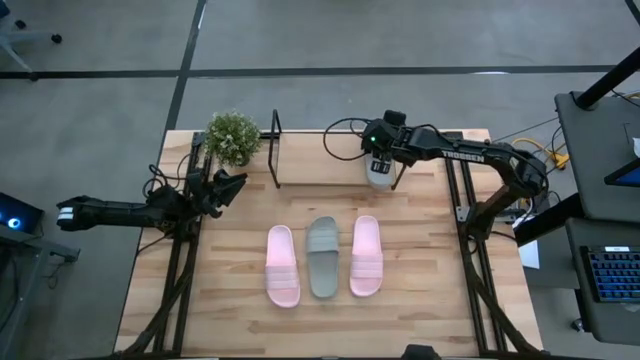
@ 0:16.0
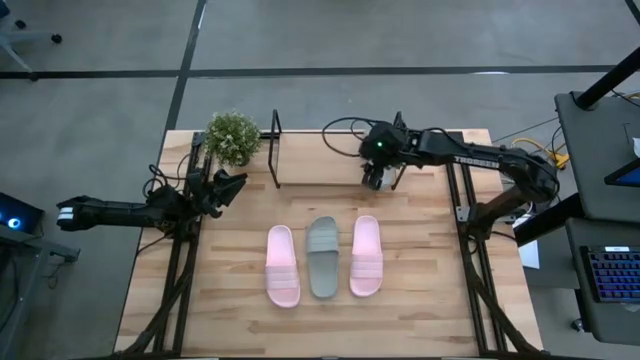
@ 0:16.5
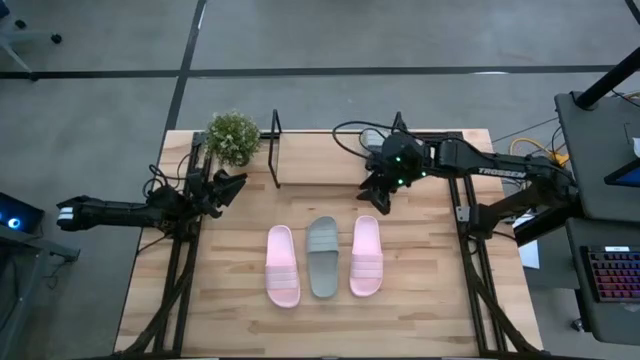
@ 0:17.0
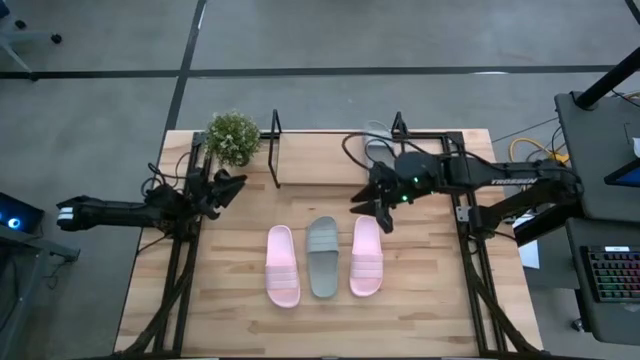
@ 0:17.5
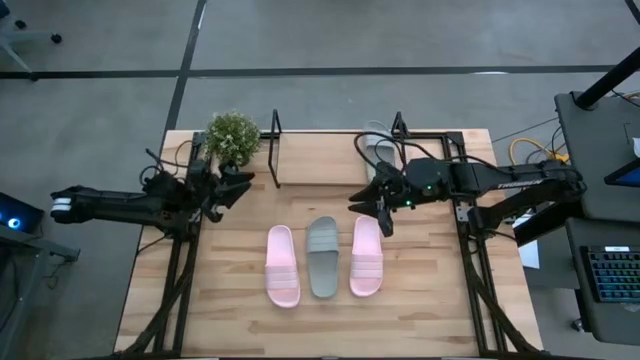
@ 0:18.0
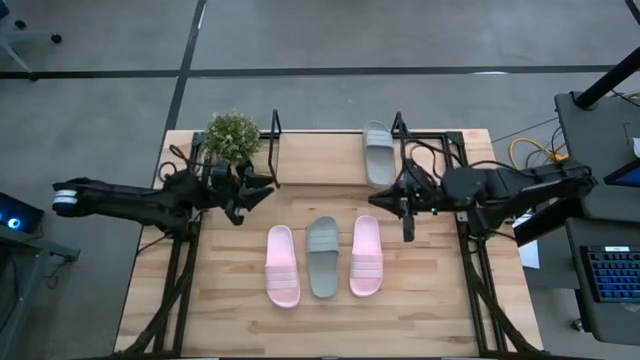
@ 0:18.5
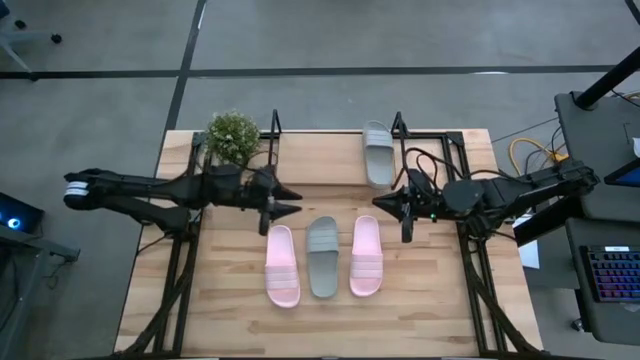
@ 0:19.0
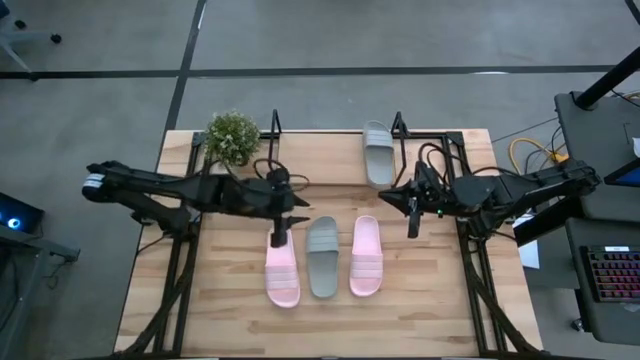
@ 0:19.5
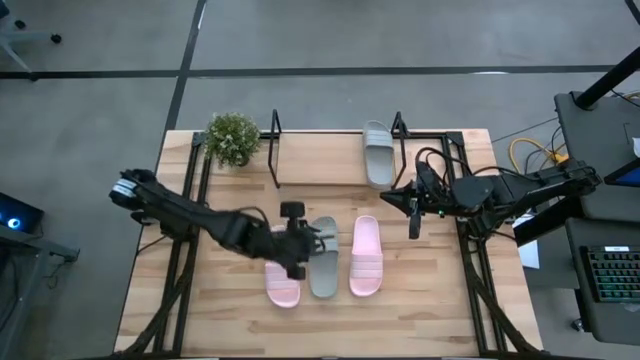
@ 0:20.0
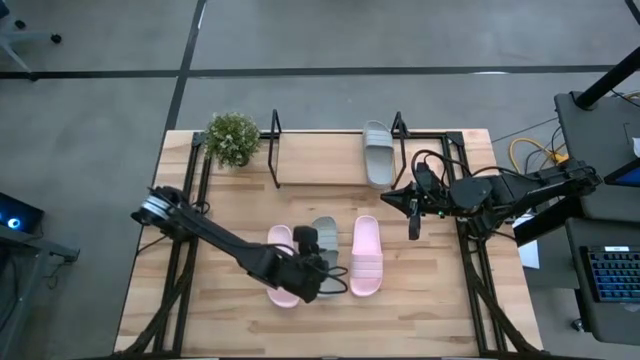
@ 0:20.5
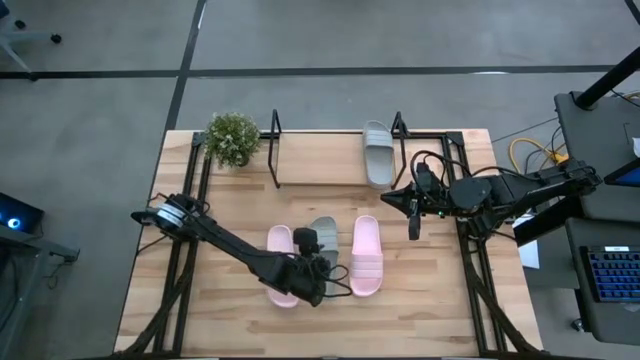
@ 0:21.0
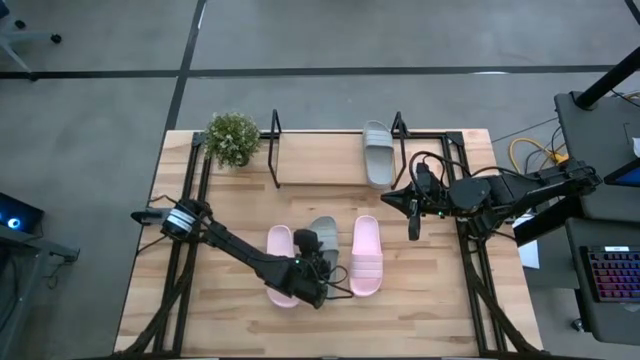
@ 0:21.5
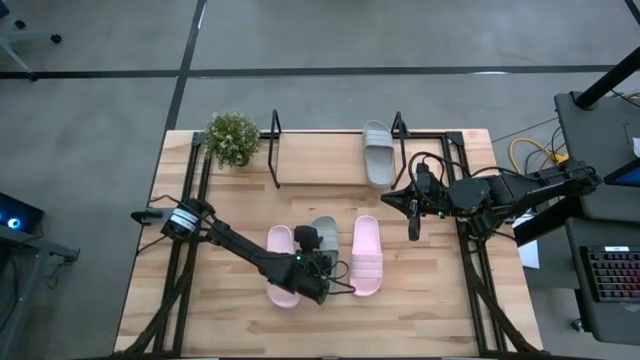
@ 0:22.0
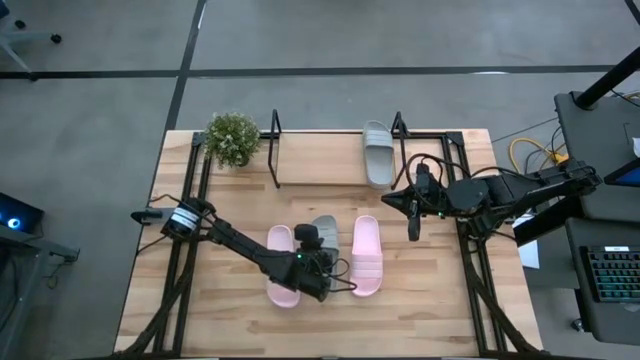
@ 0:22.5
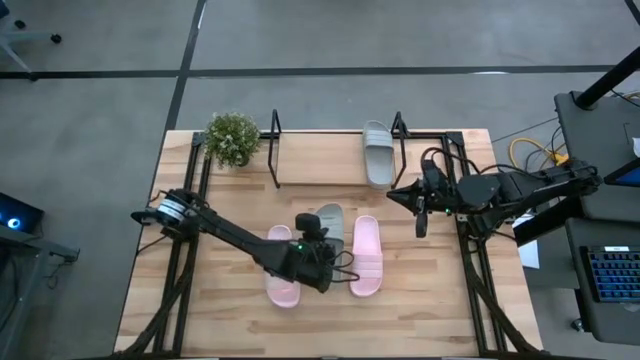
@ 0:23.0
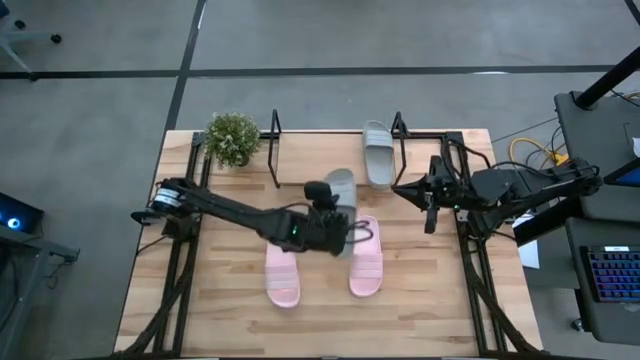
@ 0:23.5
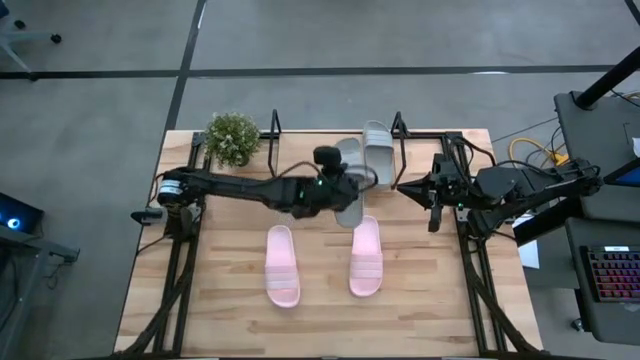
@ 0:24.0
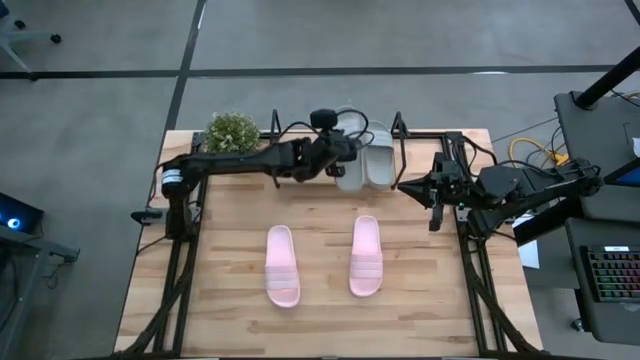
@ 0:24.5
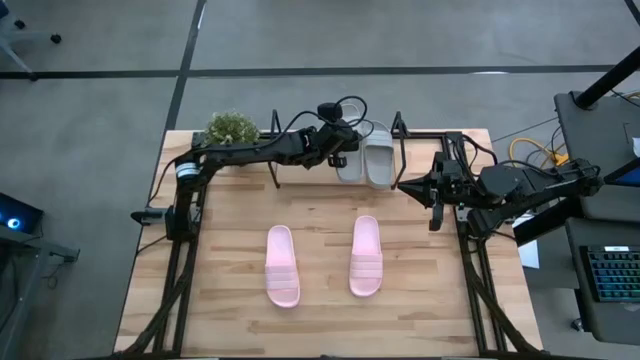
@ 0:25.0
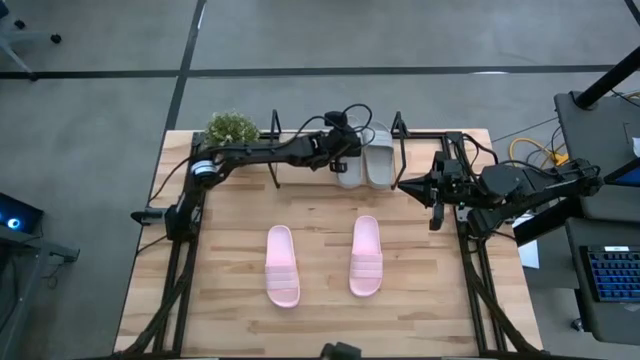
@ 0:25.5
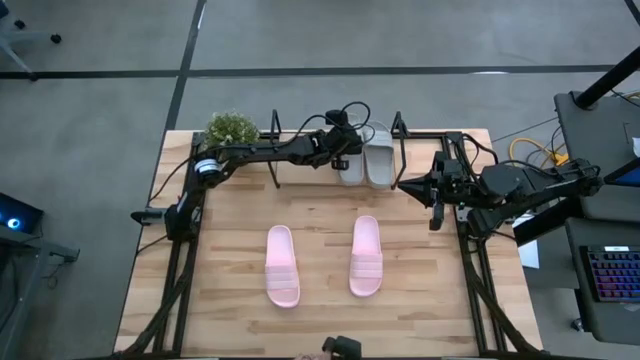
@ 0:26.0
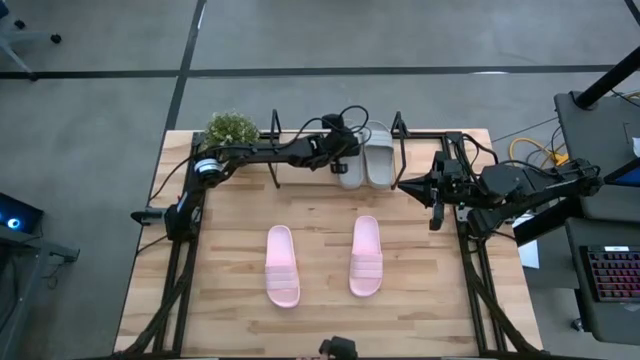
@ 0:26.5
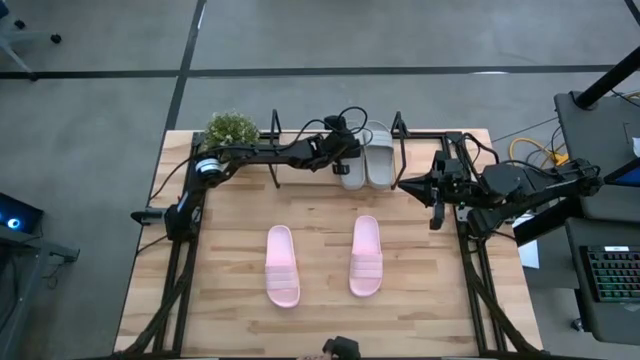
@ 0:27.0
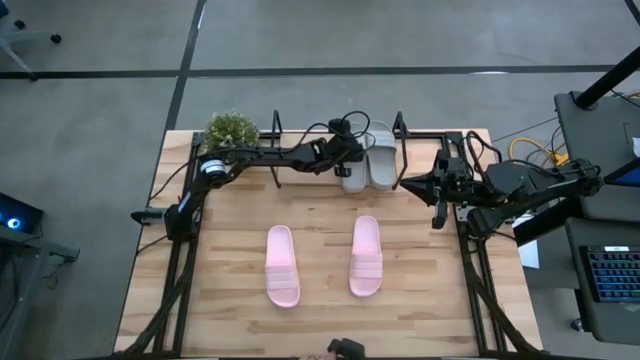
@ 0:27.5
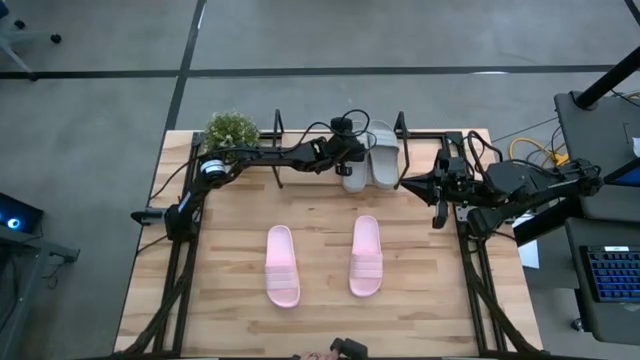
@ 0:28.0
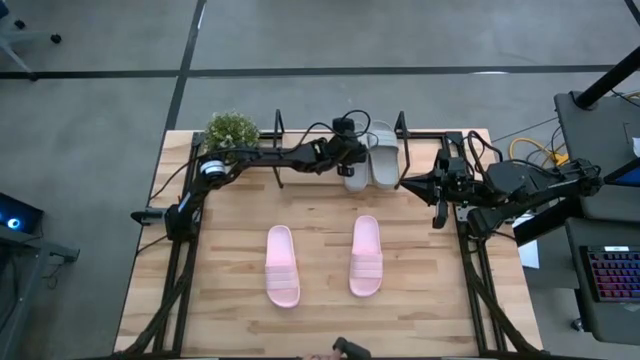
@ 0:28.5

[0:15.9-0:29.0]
Task: Pick and place slides into the shelf
Put the gray slipper on the shelf

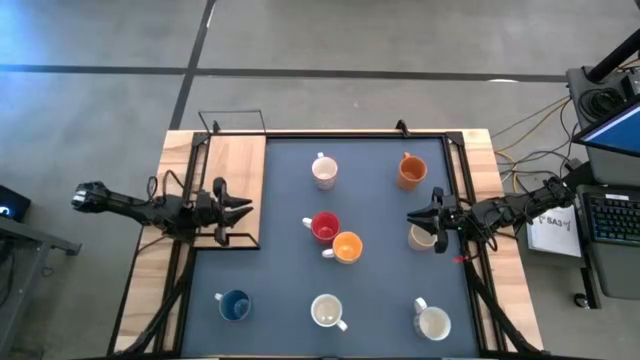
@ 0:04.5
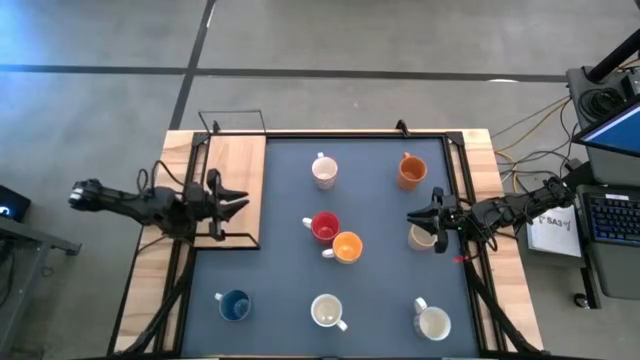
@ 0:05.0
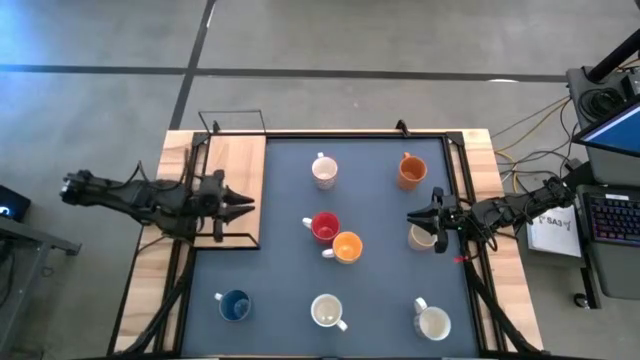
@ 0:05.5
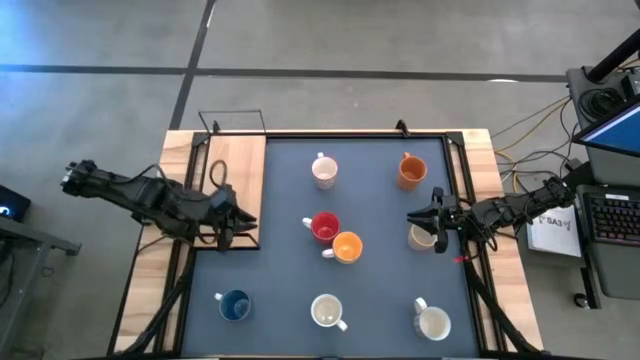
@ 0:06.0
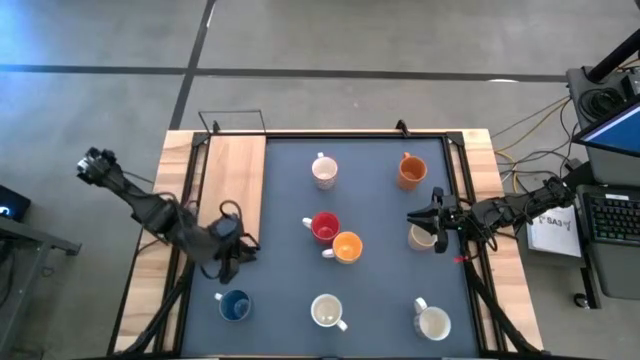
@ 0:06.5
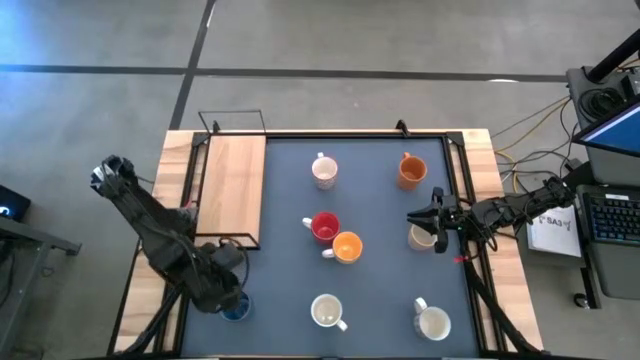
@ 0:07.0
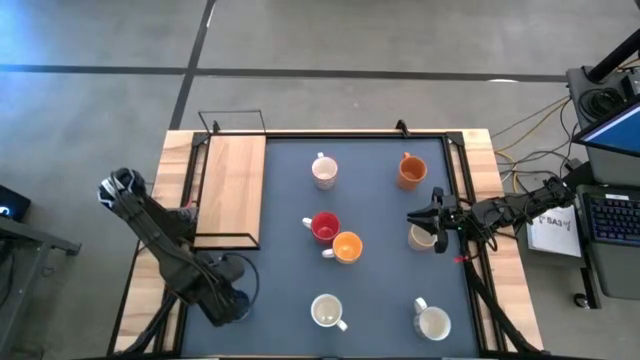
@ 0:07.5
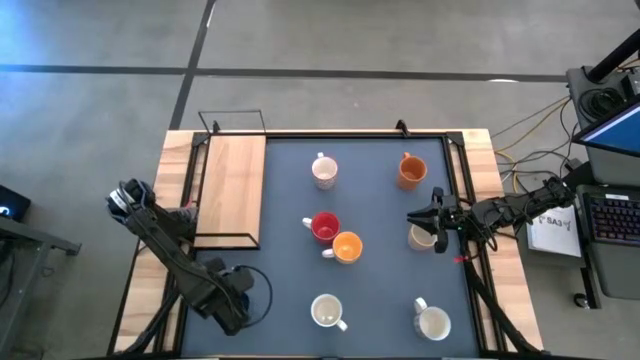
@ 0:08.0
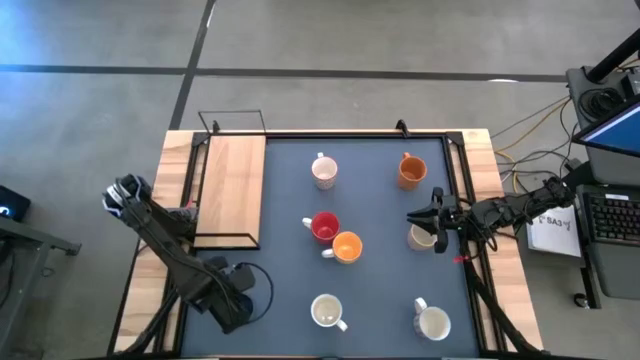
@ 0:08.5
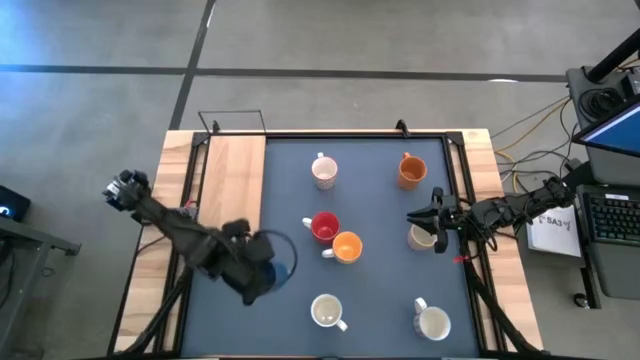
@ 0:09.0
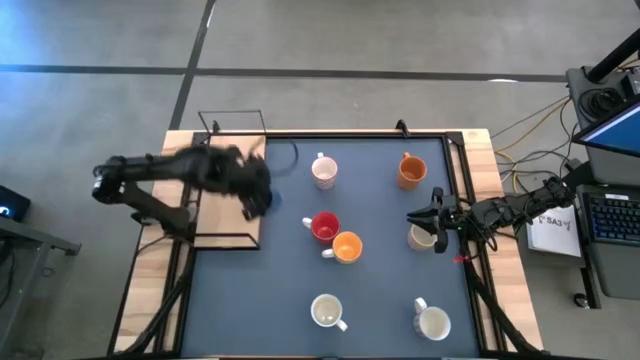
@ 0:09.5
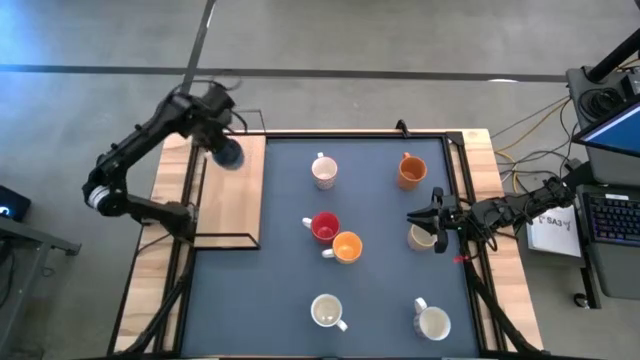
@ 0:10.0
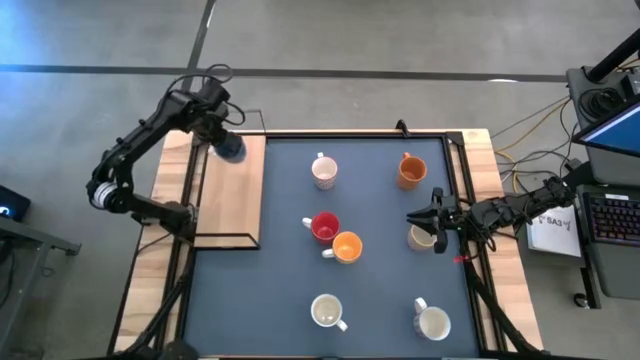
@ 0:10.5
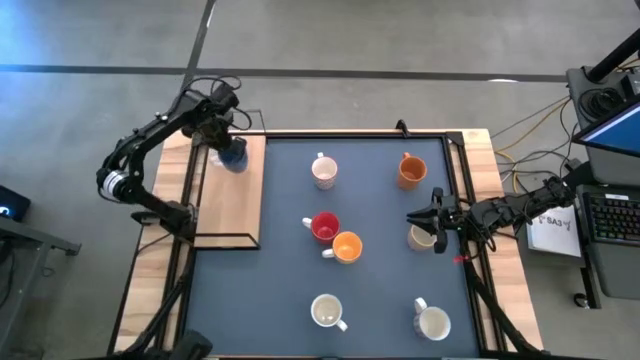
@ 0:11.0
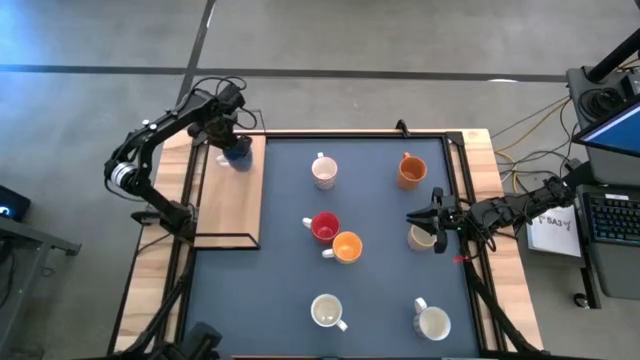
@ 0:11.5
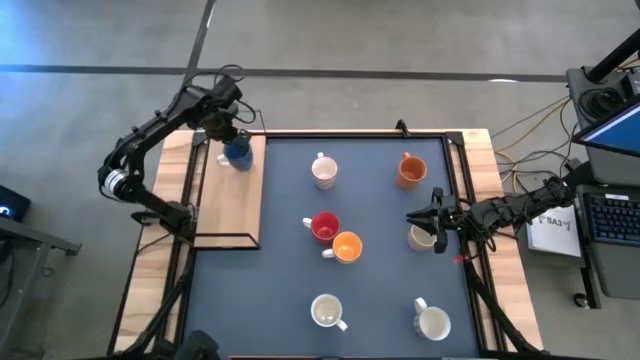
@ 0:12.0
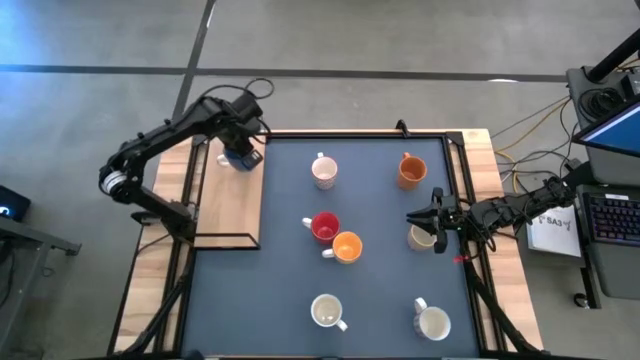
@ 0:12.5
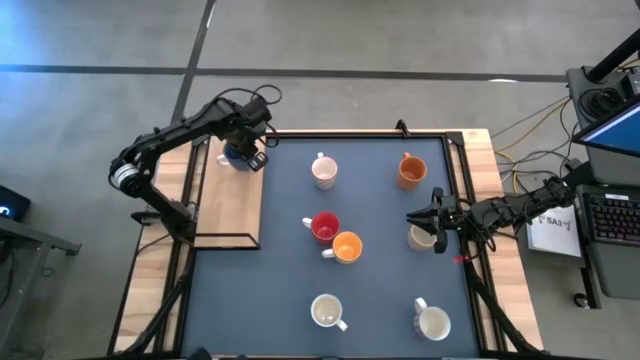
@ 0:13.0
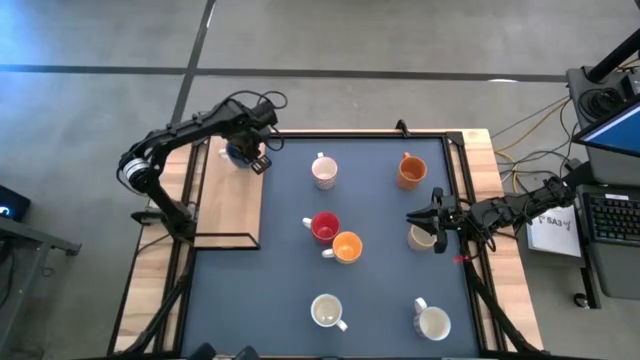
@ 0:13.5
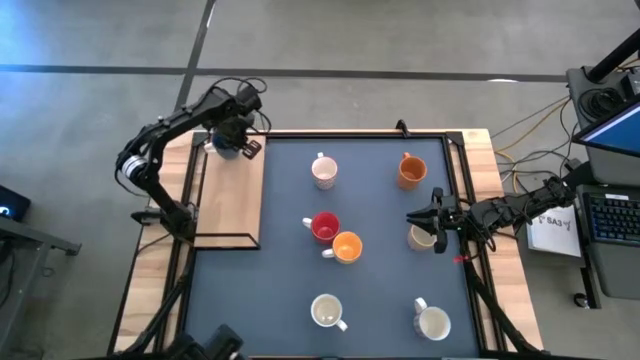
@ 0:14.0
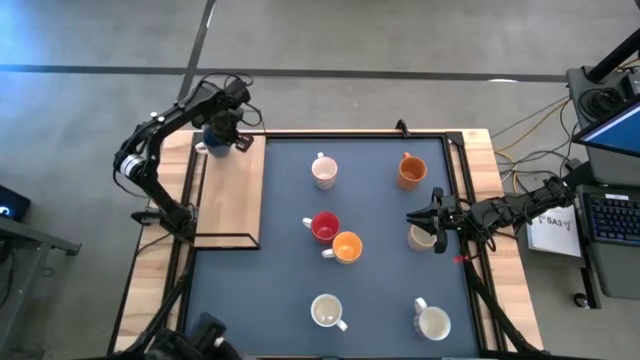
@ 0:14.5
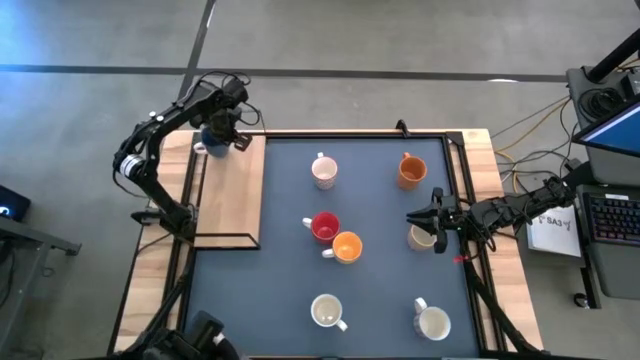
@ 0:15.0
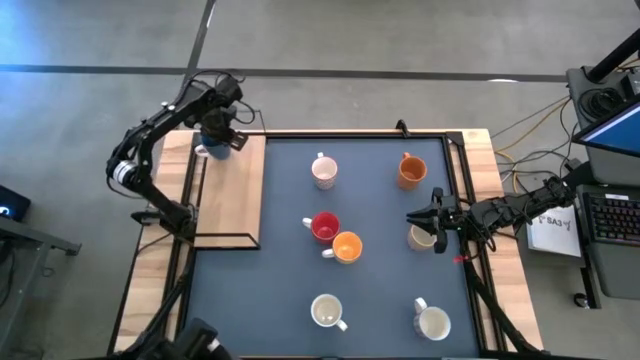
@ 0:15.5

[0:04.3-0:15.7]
Task: Place coffee mugs
Put the blue mug on the shelf
